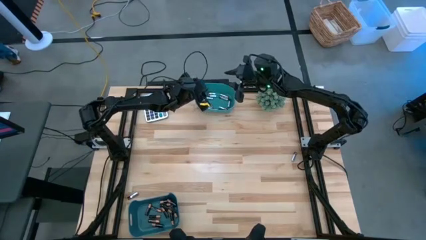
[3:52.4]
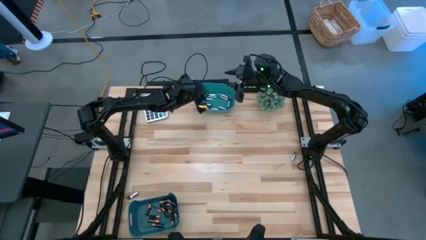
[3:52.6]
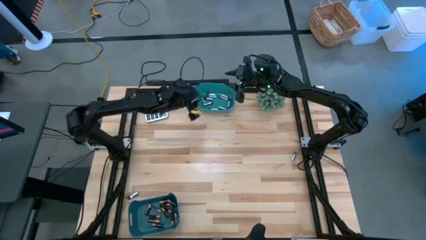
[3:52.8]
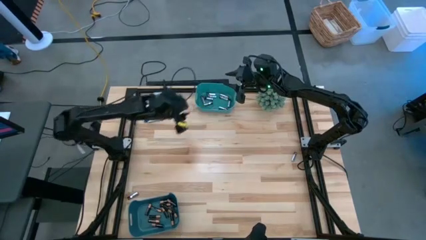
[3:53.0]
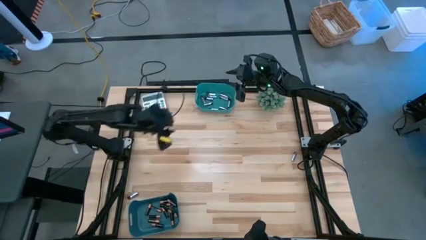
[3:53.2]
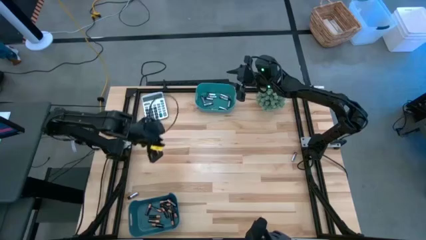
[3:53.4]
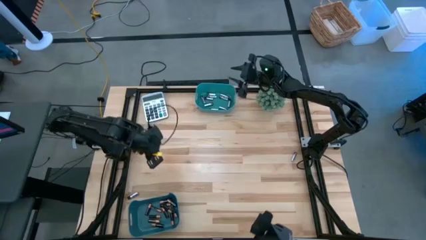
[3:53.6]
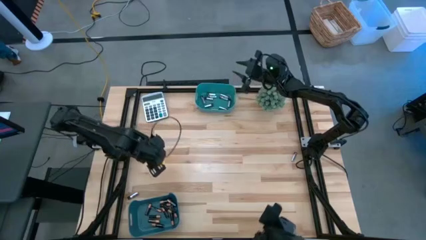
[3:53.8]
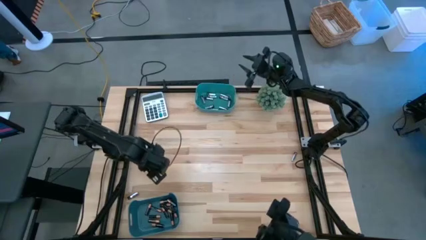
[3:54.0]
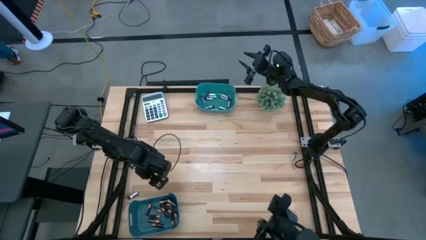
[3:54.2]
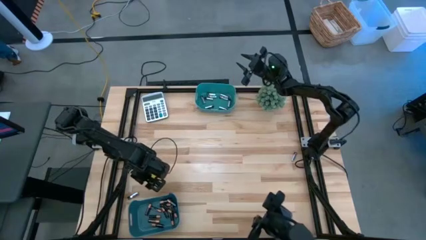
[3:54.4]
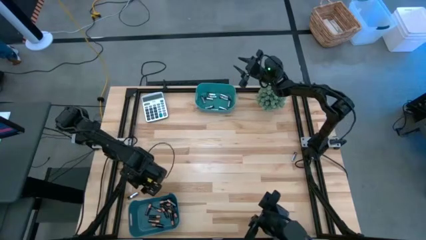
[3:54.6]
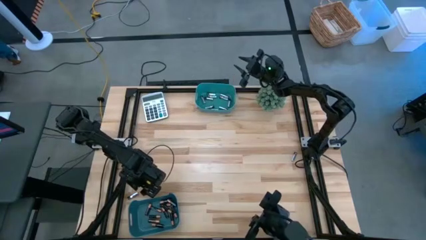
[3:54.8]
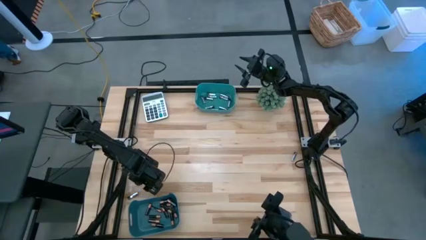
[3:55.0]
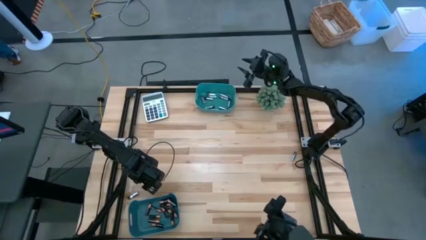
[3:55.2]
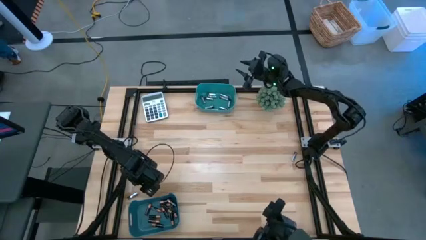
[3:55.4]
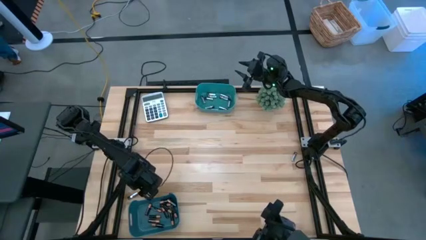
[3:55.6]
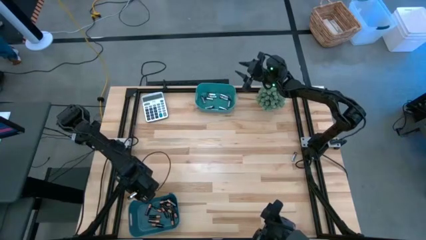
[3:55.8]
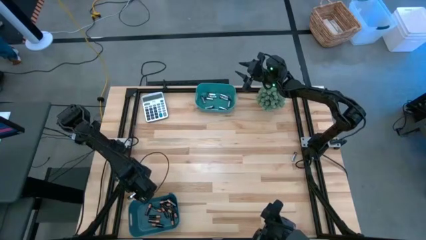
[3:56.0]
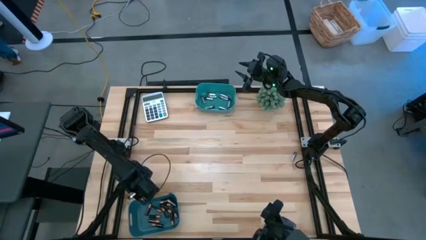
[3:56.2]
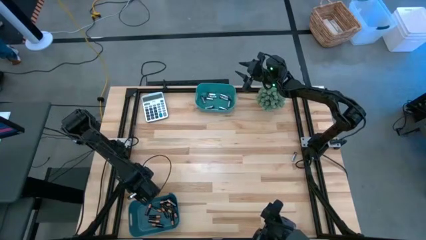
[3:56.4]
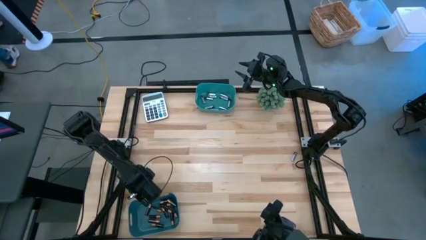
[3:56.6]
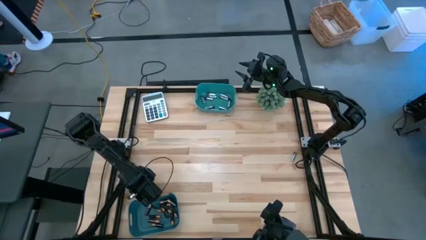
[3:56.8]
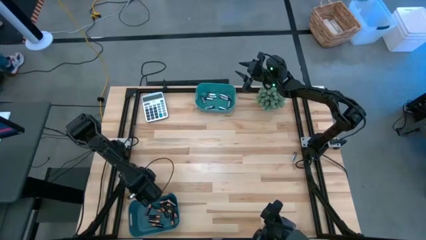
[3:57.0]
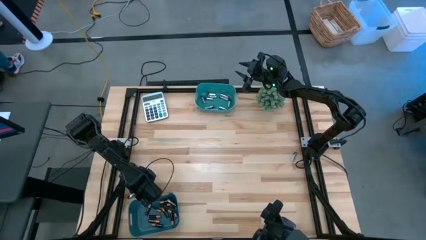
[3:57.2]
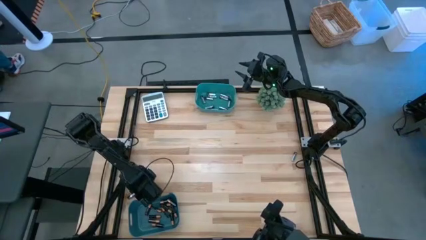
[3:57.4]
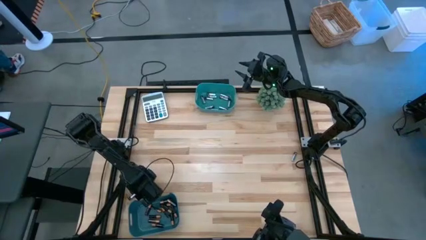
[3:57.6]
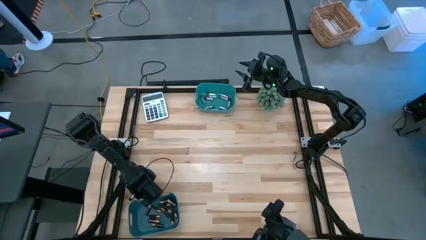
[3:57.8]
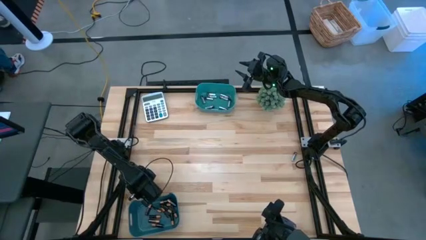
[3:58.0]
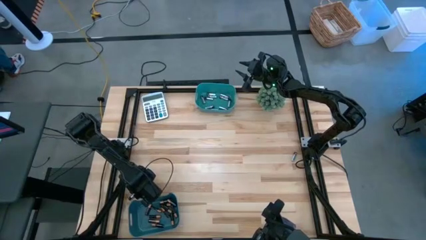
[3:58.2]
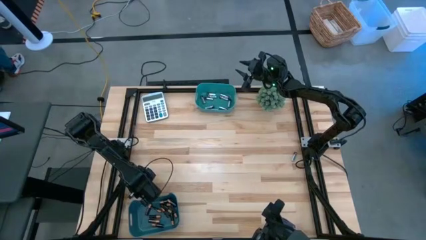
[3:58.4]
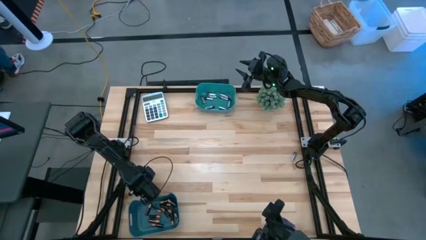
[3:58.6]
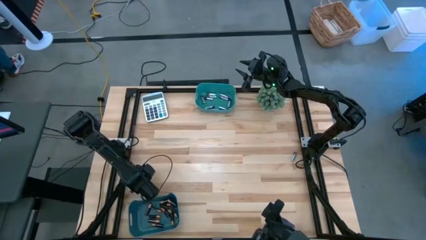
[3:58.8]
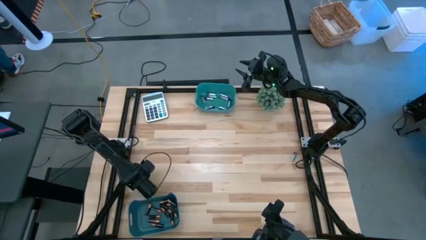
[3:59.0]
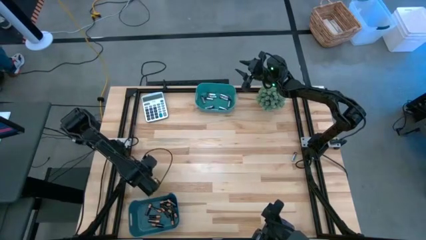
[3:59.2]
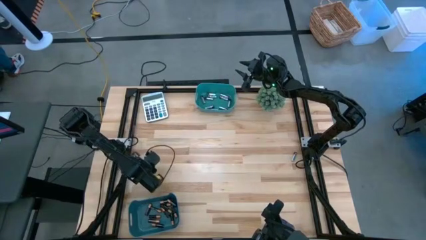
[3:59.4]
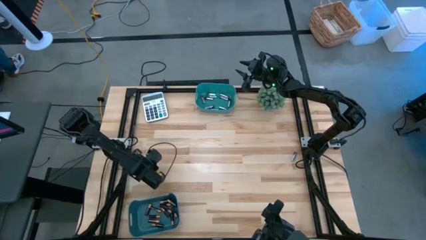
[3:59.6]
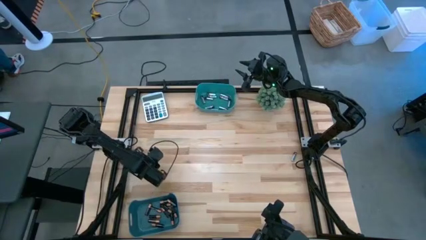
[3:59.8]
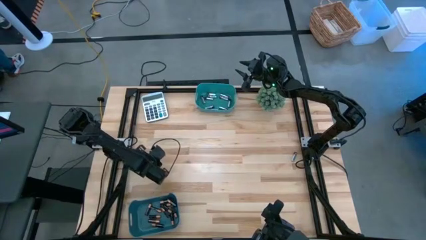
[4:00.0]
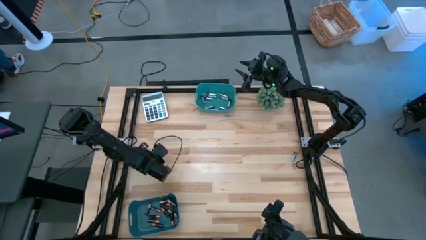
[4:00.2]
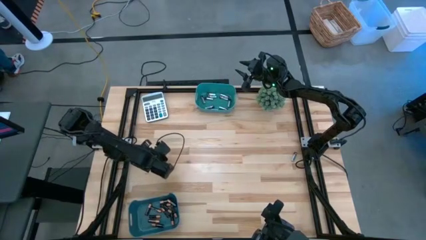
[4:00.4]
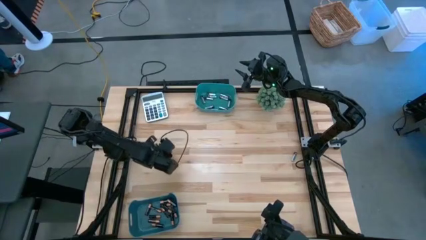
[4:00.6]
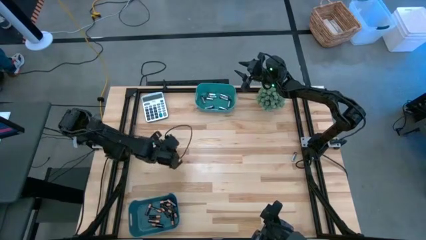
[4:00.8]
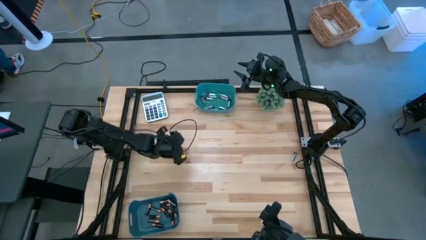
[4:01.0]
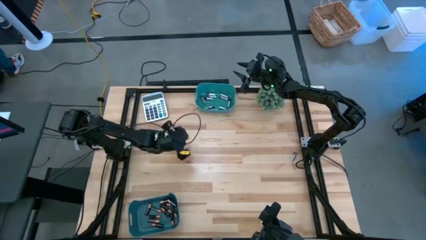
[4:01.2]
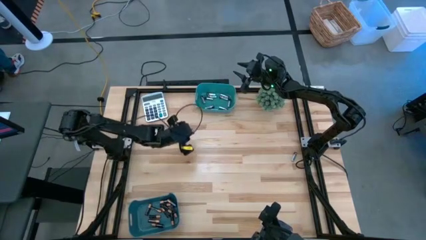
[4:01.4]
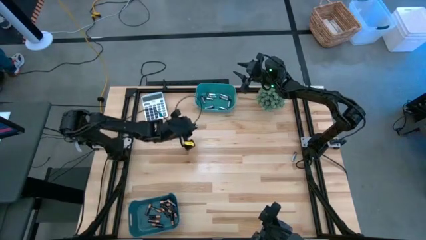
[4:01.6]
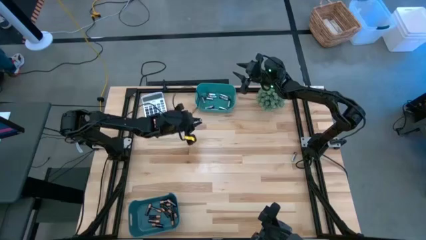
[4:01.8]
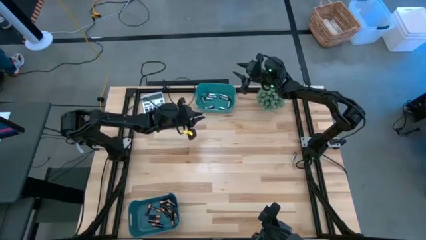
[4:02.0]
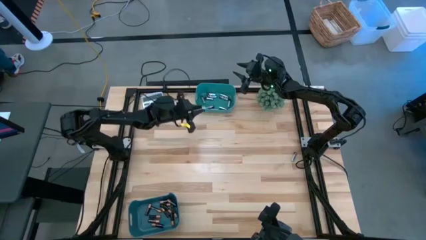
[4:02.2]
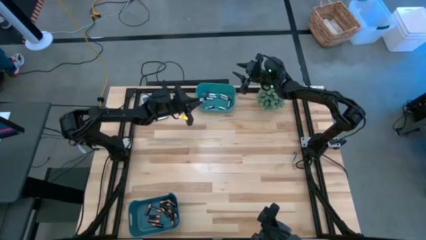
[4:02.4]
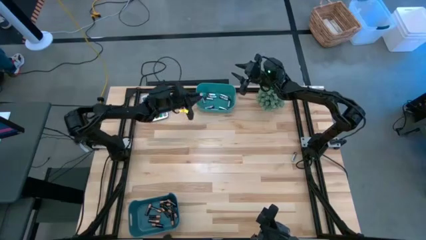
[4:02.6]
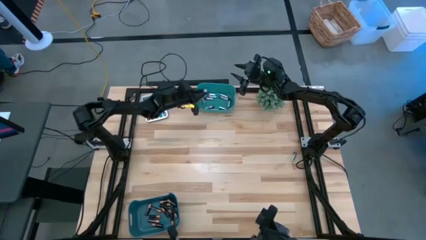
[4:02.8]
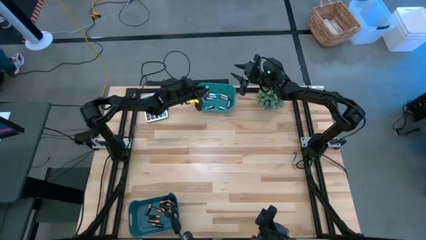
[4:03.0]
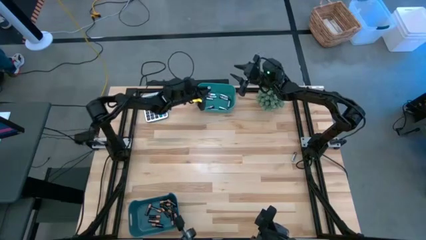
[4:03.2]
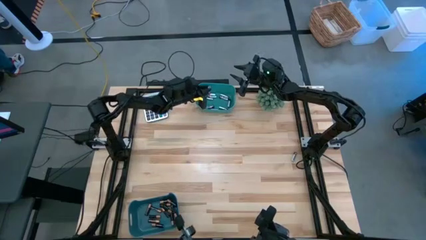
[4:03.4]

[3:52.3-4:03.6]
Task: Sort batteries
Put the battery into the top green bin

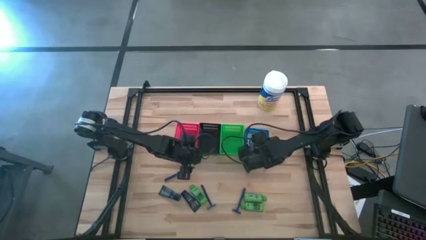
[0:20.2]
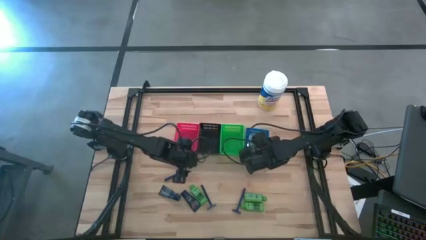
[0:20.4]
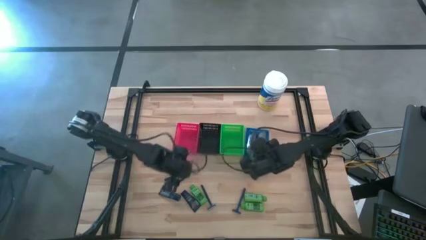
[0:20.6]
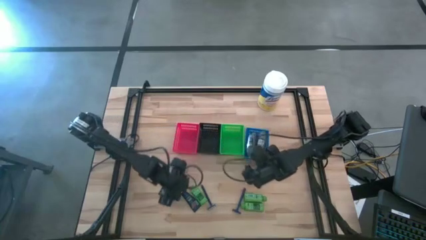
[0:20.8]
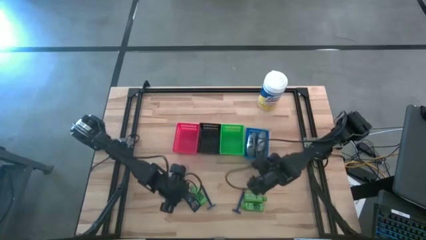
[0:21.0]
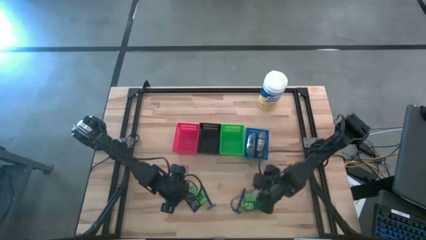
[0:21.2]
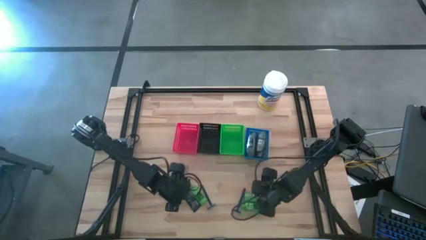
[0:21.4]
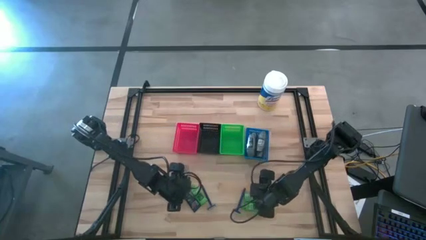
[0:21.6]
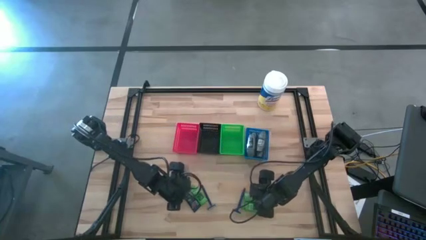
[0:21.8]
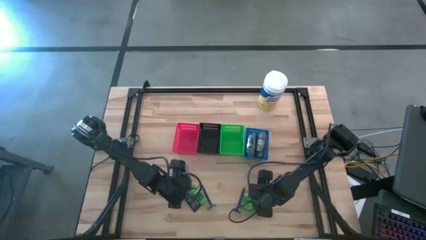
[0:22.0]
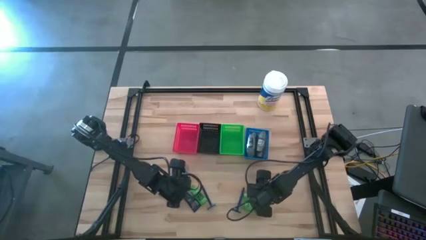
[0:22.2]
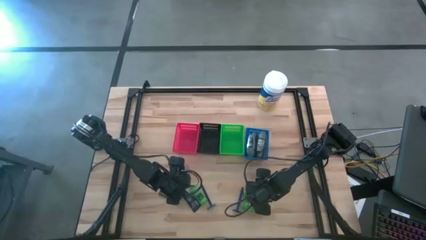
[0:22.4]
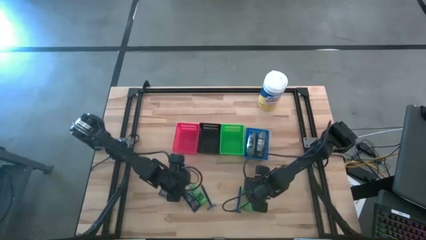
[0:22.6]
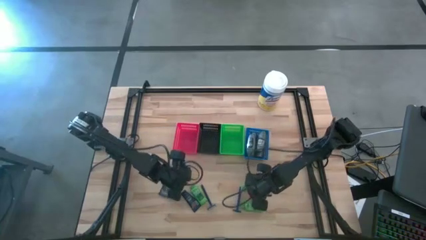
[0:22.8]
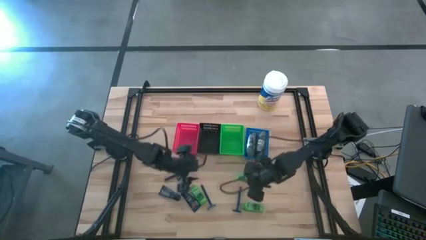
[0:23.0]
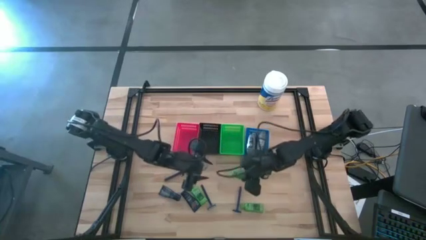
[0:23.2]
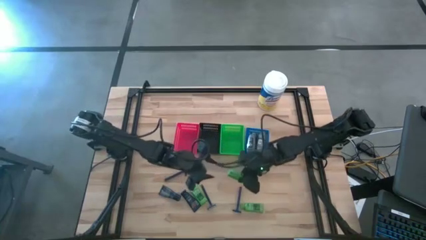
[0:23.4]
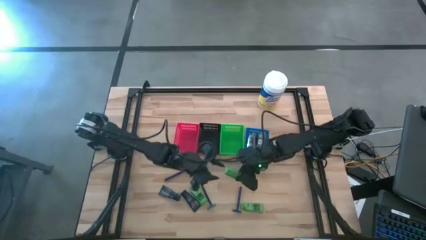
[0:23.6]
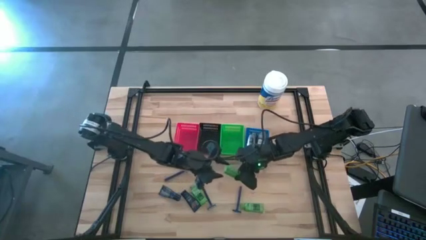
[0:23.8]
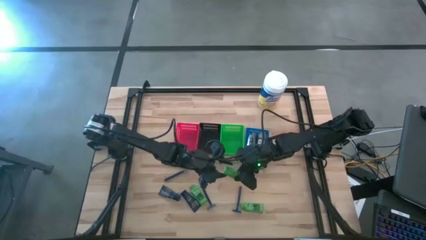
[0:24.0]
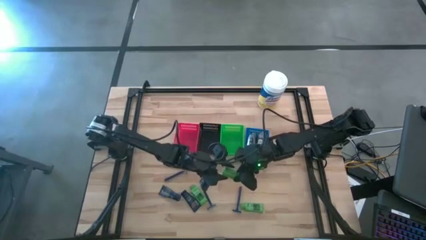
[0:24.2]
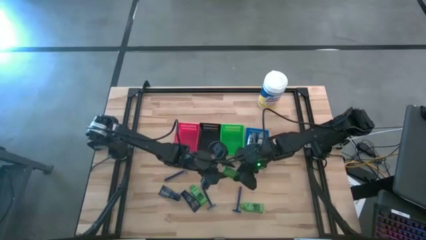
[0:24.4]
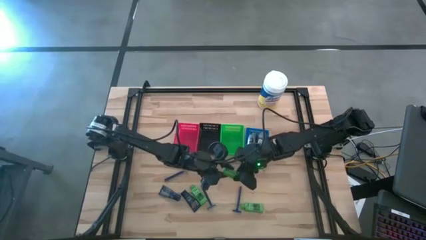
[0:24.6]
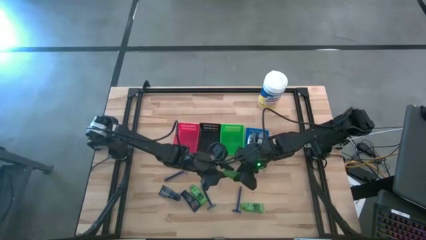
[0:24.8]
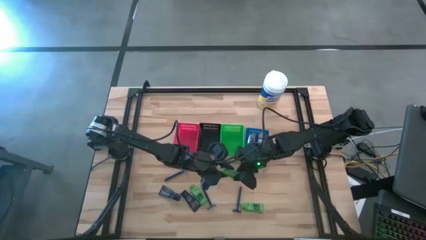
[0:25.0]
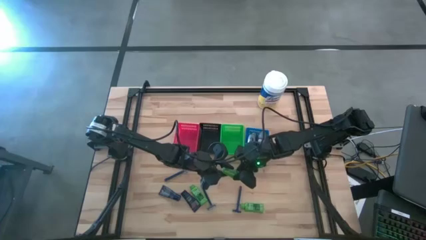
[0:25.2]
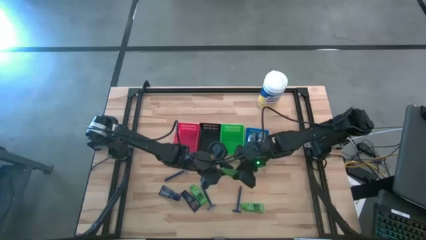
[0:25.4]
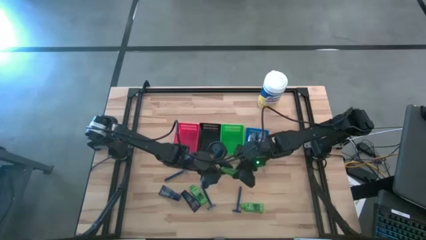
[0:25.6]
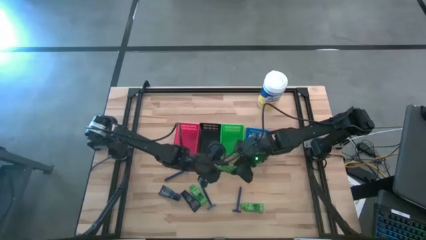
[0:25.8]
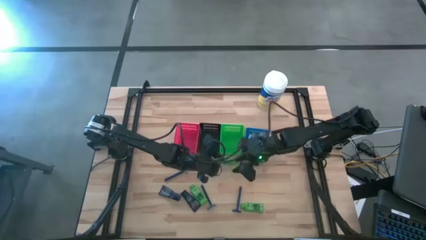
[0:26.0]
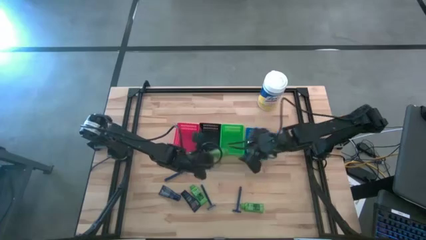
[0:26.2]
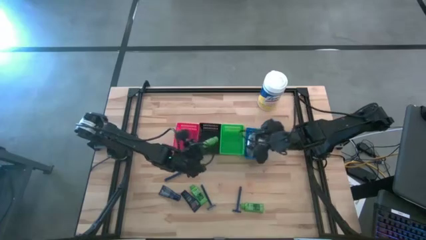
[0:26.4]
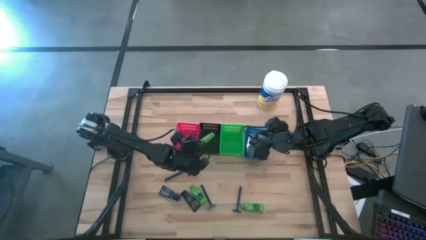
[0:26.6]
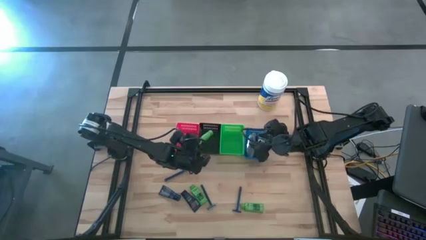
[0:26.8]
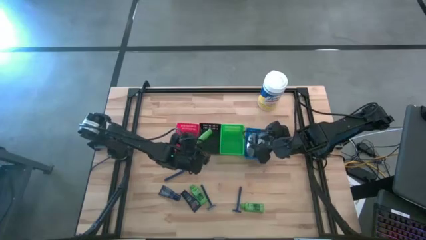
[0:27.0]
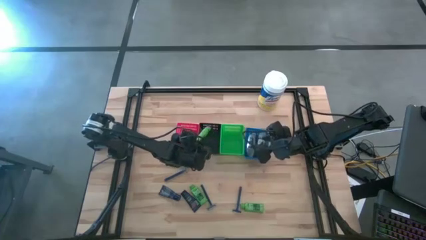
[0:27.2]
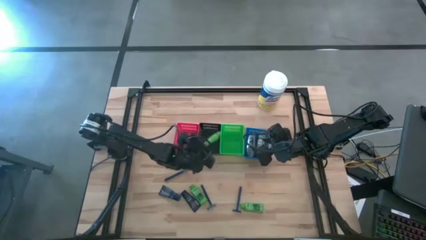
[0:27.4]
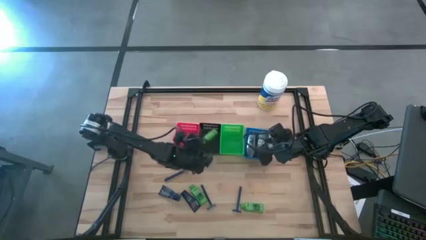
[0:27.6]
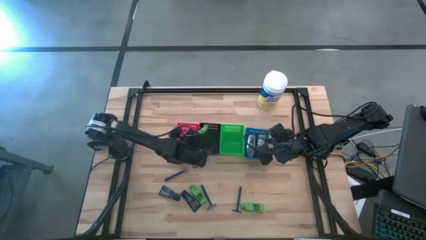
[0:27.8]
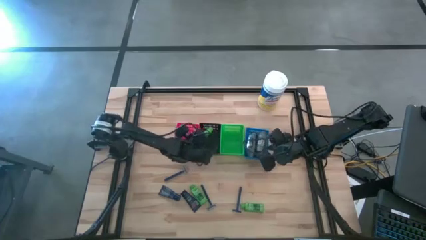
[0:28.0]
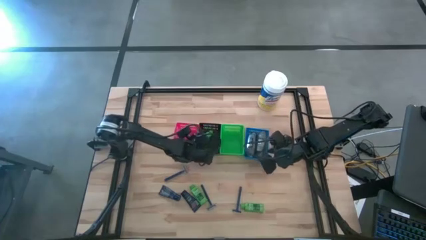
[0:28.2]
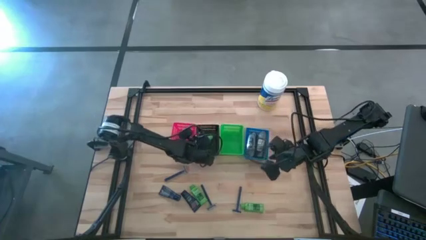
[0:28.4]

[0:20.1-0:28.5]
Task: Pick & Place Travel size toiletries
Put the green shampoo into the black bin
